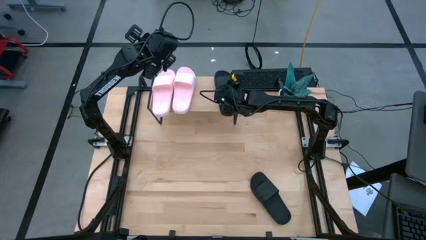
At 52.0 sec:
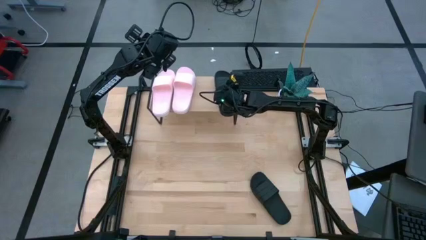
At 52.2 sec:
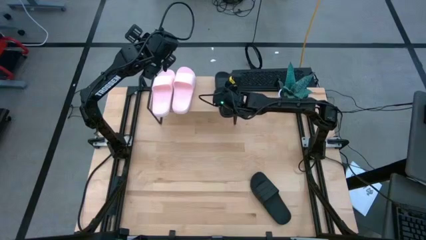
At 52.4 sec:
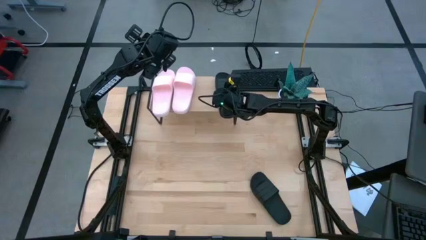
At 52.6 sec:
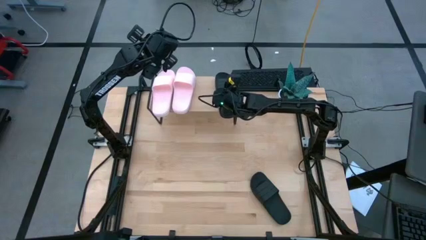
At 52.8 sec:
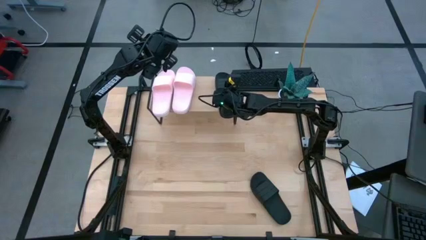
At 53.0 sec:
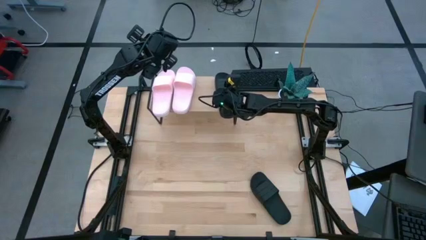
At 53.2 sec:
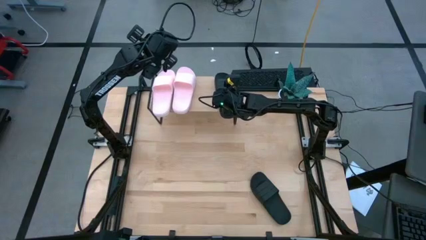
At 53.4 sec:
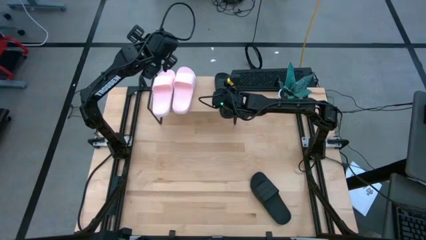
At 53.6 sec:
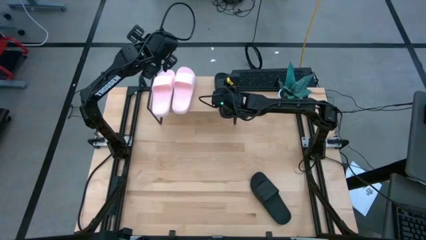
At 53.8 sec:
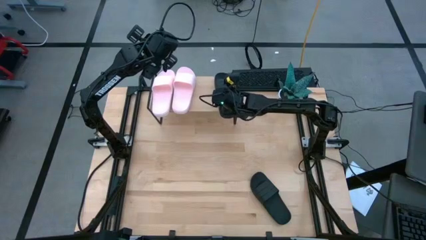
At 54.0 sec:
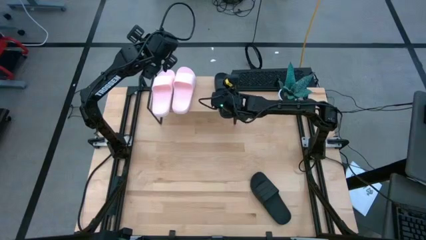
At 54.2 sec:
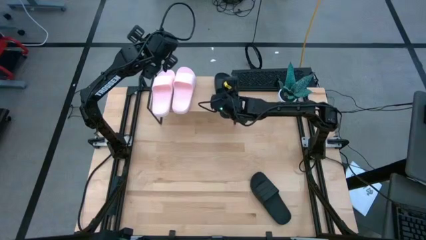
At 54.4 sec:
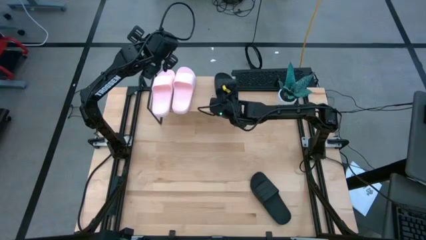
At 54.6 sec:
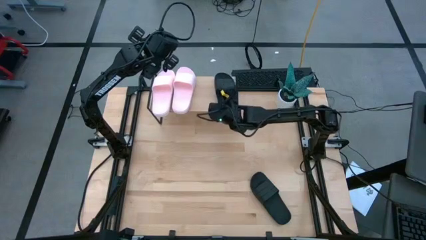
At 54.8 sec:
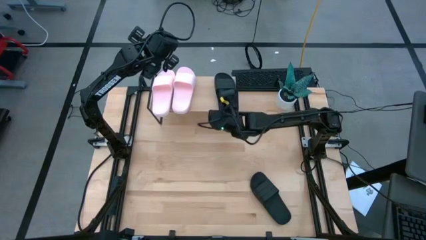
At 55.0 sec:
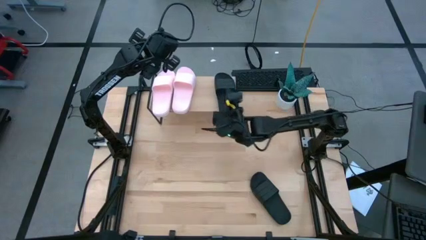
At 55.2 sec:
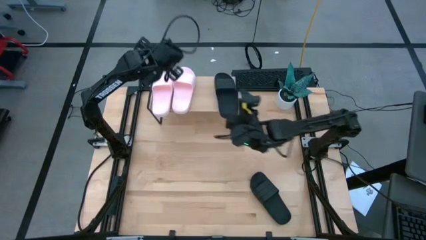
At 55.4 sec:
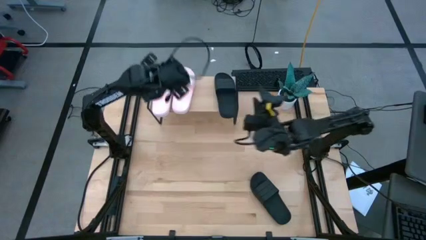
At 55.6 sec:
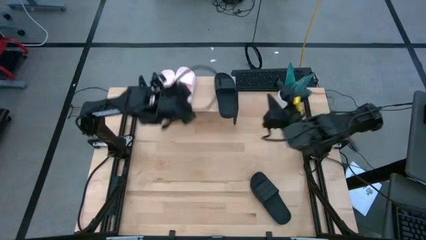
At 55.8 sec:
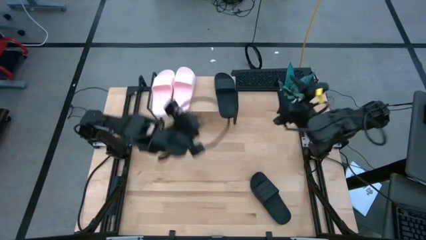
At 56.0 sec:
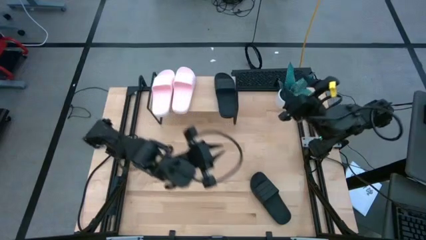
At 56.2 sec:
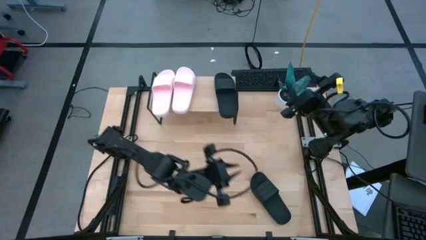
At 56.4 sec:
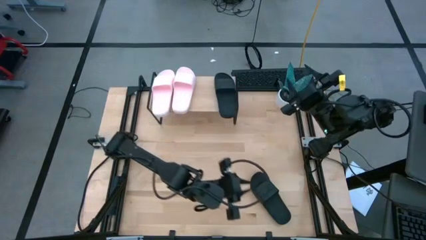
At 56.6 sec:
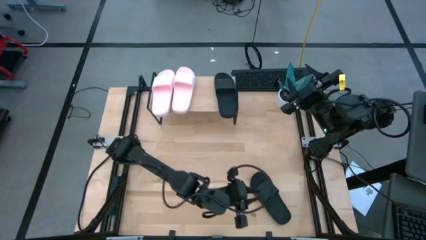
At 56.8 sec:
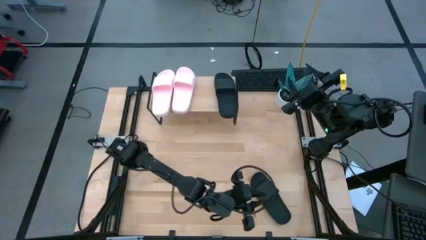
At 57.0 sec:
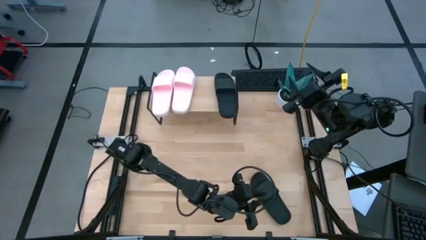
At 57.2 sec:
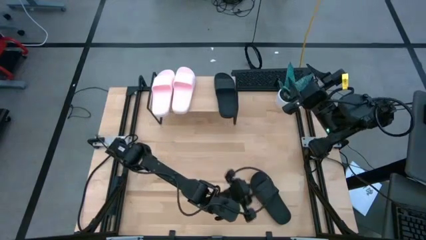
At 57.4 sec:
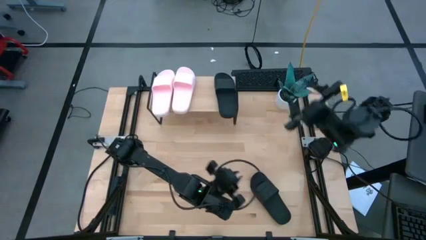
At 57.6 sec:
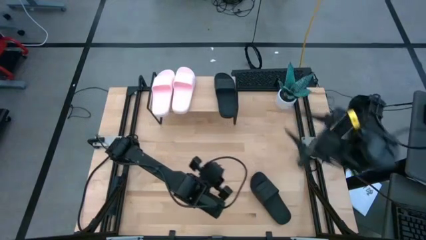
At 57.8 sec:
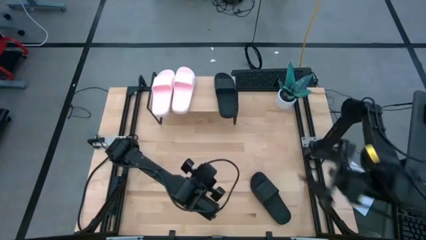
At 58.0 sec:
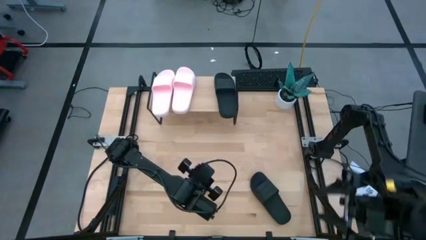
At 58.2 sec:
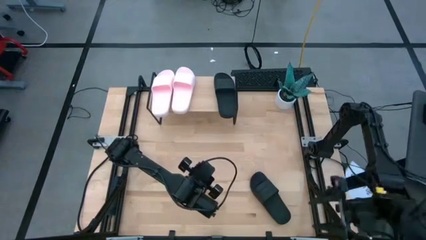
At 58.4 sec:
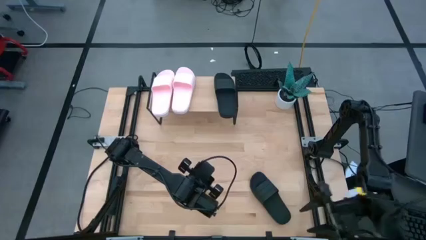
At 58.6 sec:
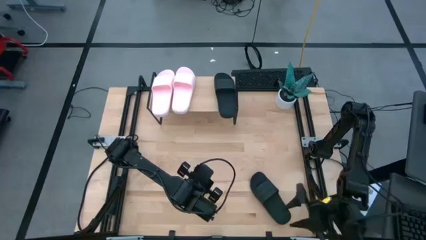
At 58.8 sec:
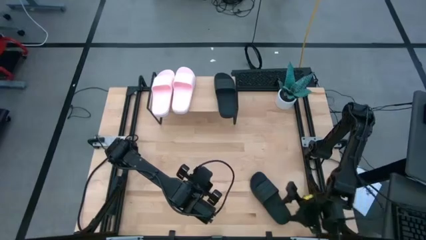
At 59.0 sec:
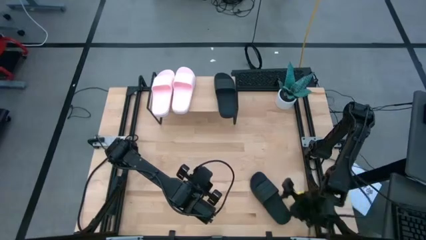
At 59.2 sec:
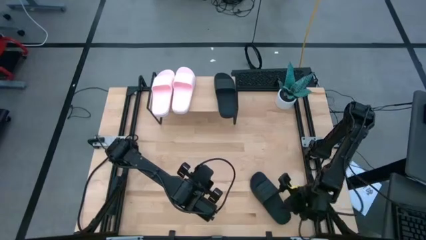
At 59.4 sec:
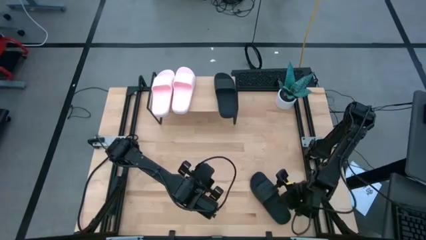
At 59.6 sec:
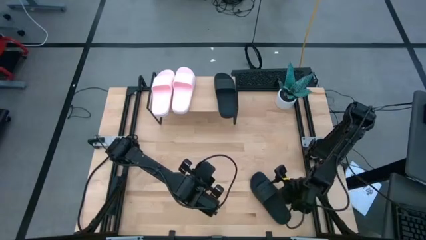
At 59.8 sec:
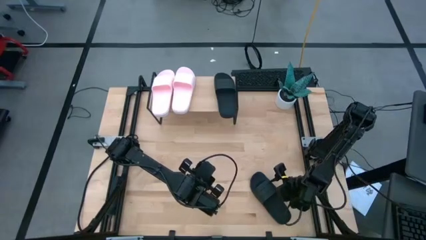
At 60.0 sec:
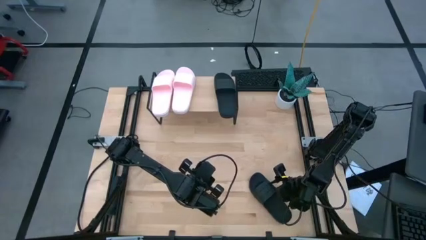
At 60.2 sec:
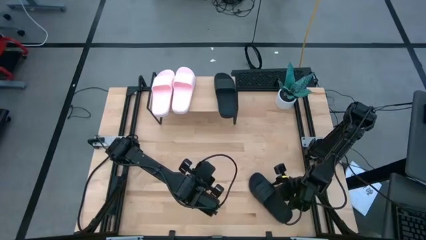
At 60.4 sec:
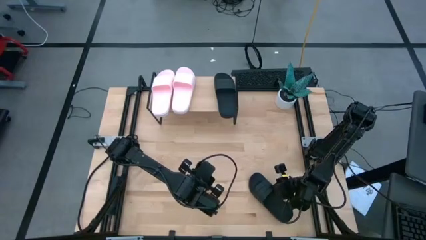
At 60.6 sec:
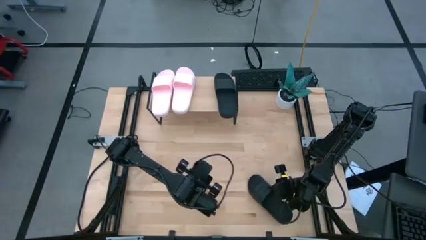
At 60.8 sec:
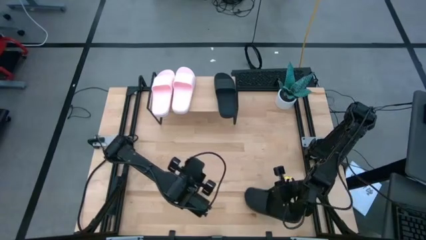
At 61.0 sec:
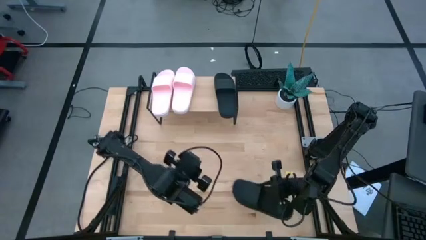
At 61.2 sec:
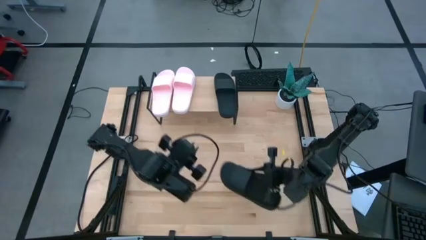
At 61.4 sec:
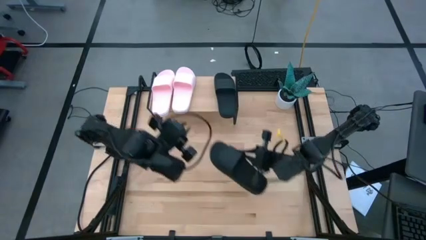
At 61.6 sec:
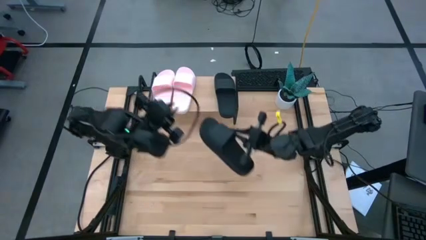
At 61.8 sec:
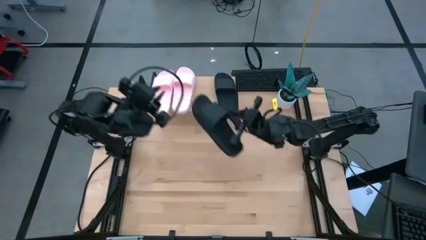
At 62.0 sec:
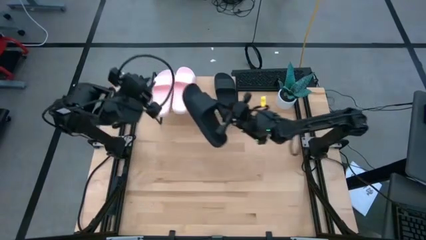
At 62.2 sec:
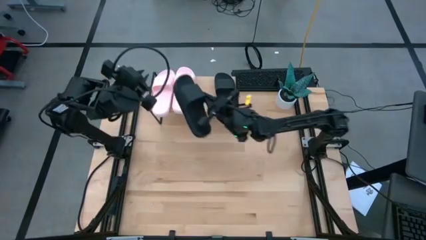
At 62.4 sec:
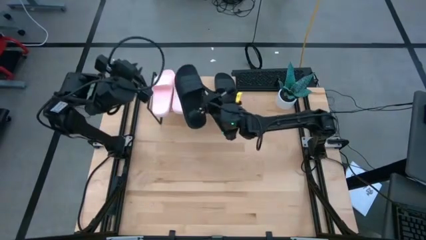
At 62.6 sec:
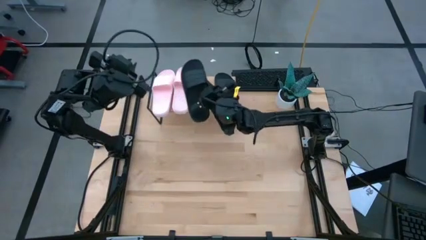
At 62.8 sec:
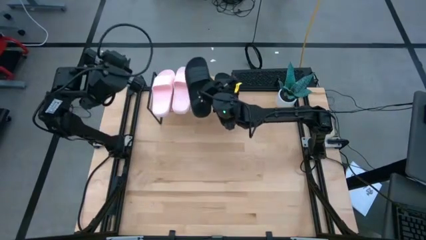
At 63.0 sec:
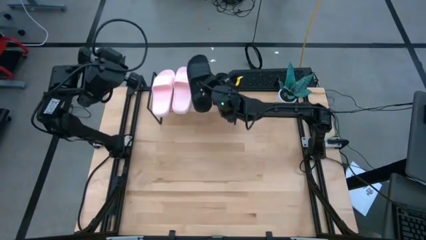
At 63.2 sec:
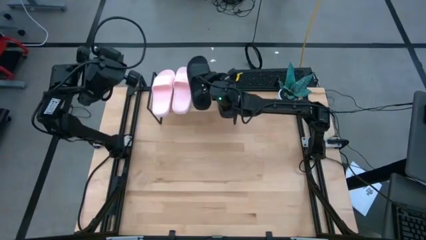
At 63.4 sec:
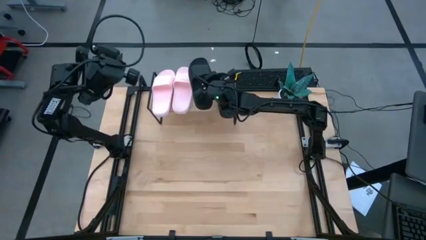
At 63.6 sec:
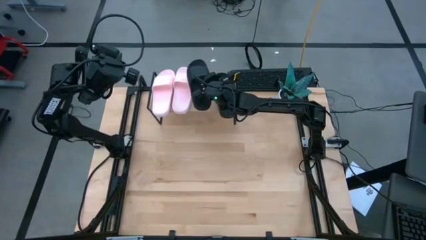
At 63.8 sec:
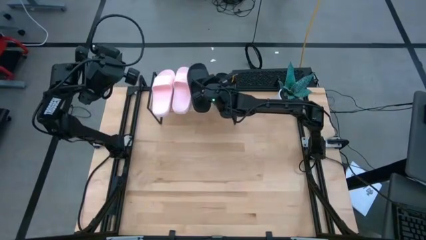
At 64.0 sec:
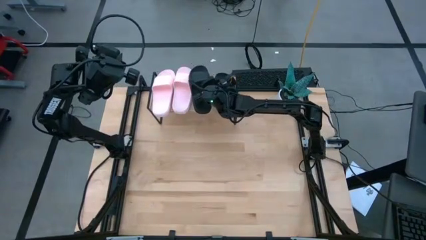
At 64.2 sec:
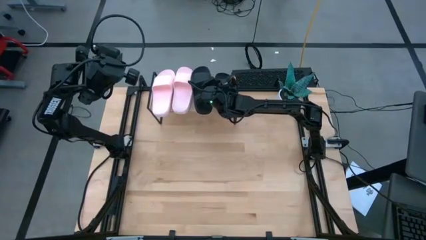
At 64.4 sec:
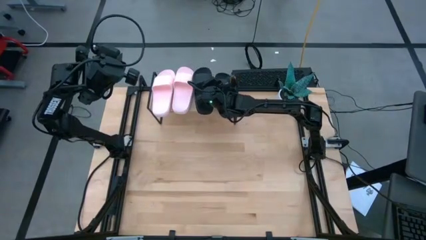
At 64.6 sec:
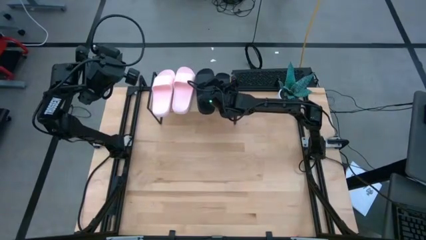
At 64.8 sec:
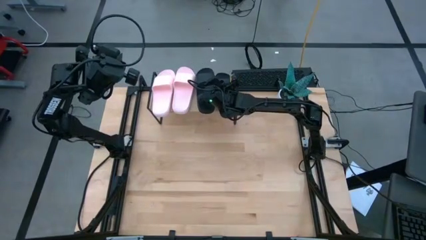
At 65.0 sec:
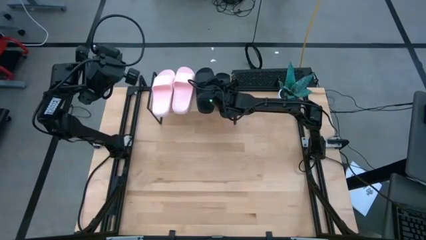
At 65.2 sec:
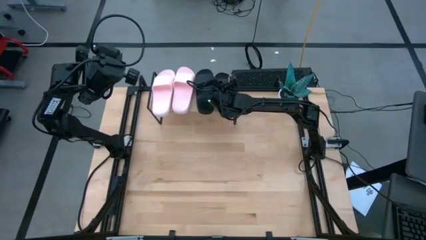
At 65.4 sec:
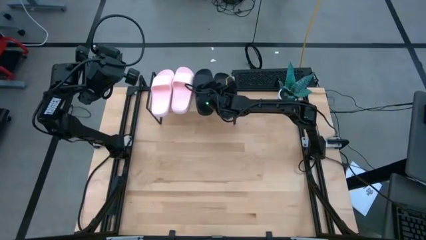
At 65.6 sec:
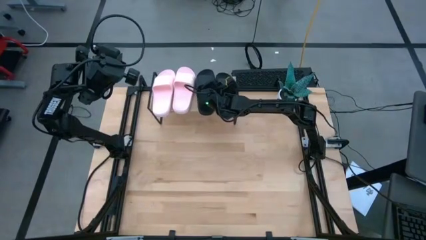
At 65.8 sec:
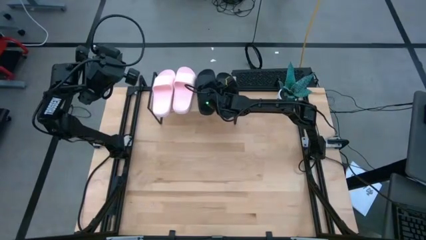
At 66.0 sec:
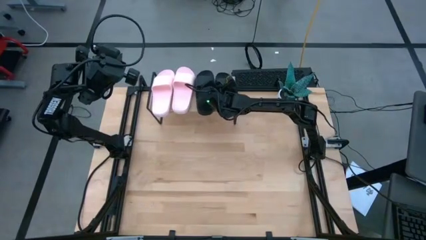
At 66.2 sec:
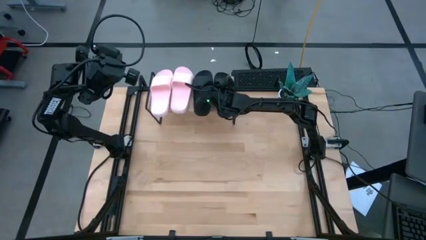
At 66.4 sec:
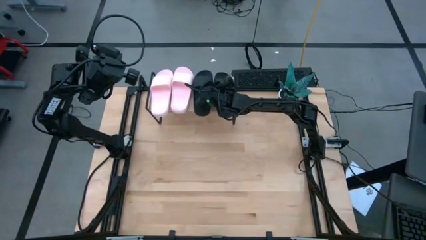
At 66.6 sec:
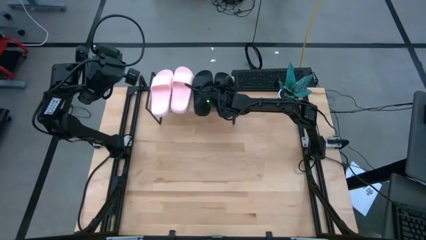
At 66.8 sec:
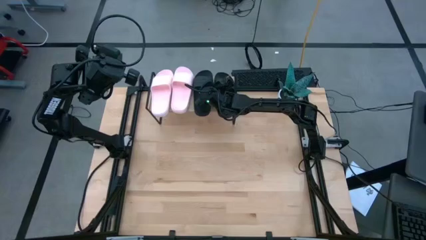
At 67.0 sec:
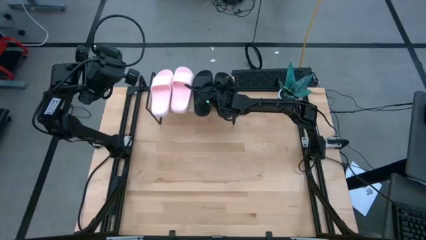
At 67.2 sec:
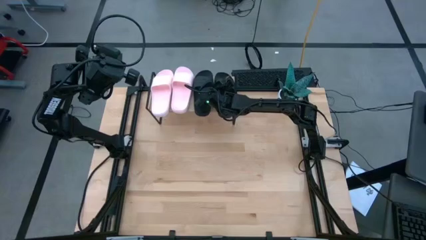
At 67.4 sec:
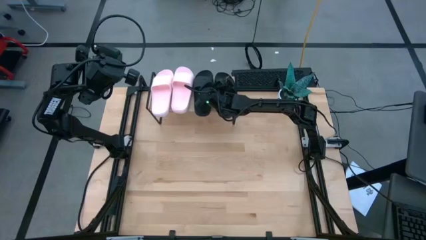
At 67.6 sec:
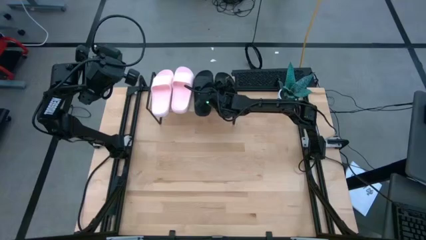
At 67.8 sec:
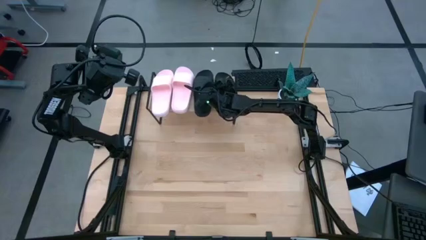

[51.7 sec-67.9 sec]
Task: Pick and place slides into the shelf
Put the black slipper on the shelf
